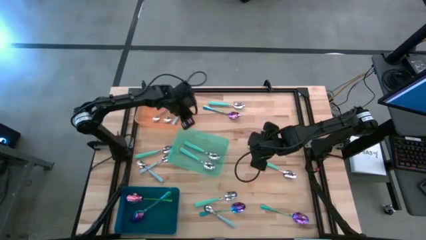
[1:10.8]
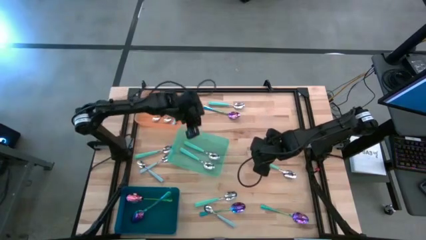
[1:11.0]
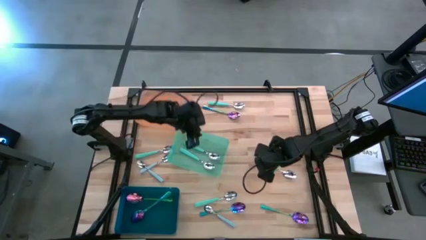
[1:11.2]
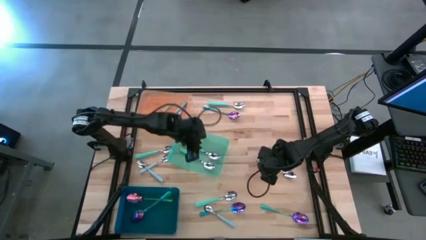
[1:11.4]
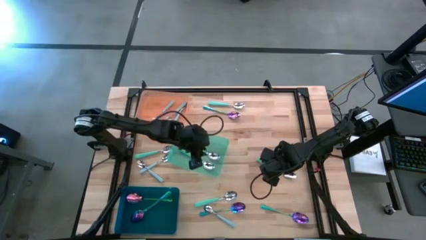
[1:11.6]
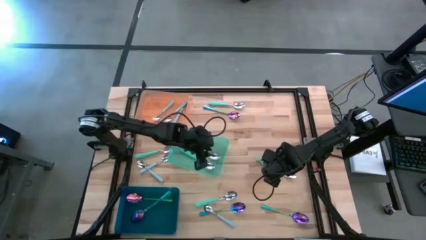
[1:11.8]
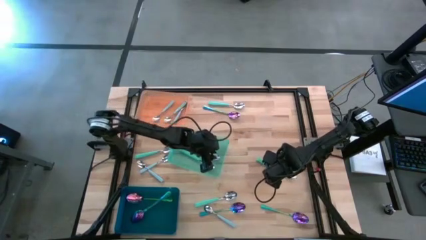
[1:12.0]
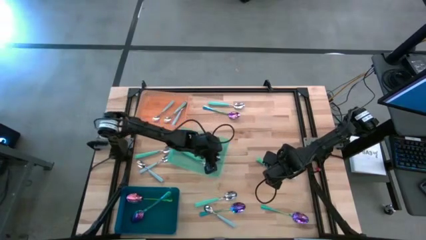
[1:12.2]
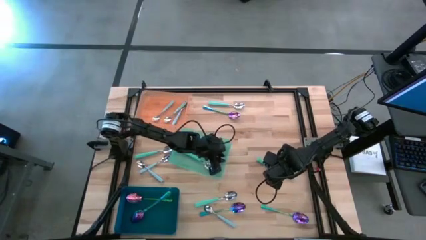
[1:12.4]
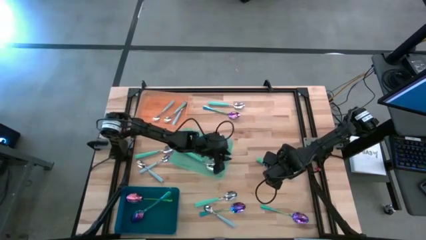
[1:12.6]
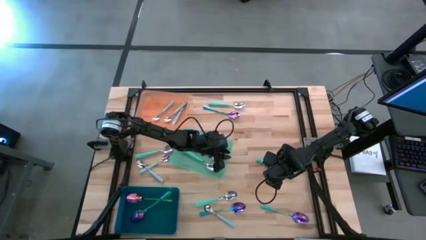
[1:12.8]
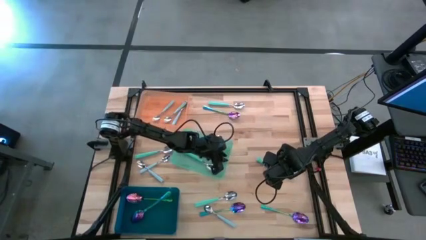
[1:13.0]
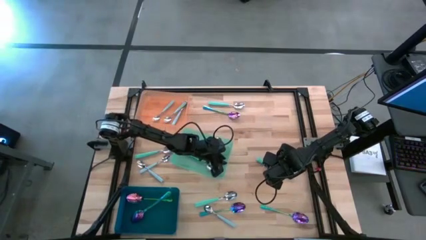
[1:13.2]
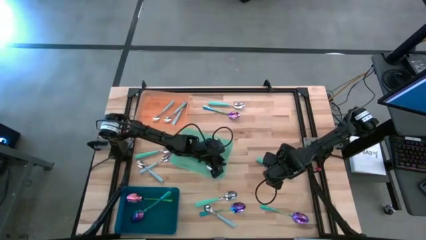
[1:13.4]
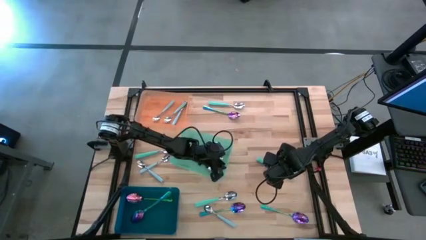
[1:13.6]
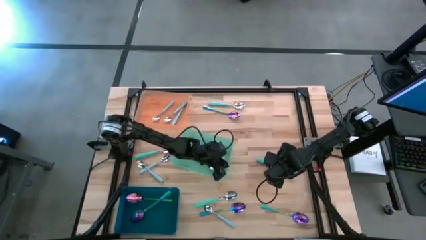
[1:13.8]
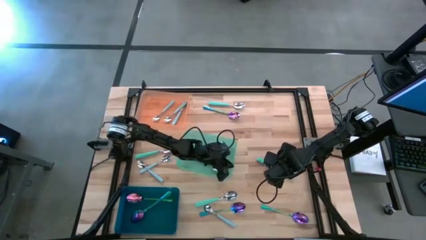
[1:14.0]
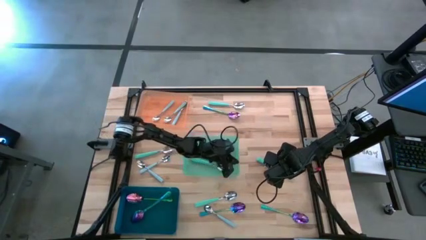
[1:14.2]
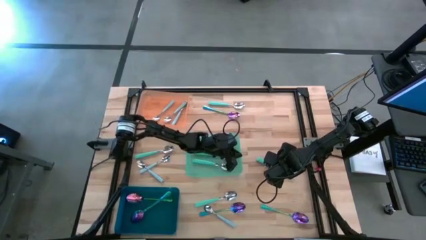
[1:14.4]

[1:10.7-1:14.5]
Task: Sort silverware by color (type)
Adjust the green bin on the table

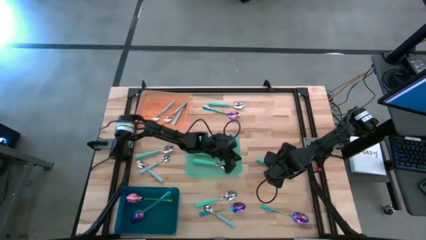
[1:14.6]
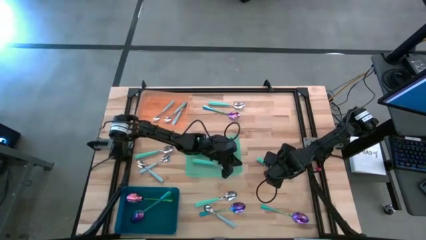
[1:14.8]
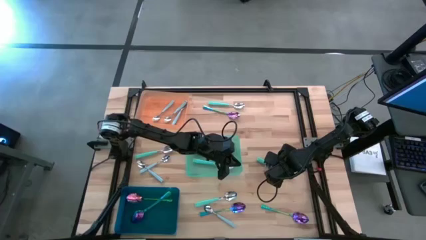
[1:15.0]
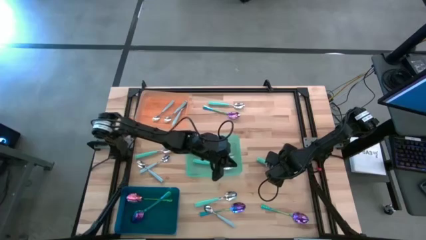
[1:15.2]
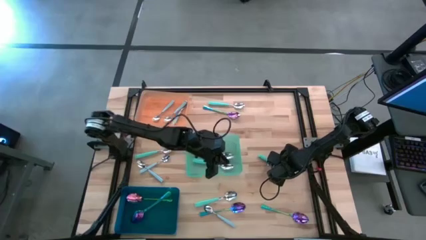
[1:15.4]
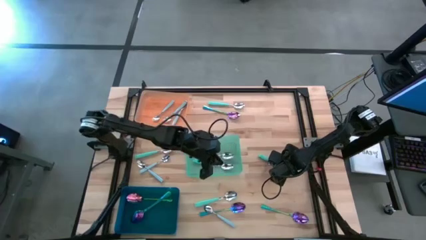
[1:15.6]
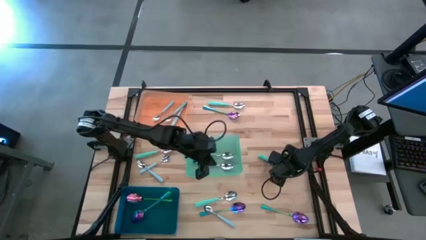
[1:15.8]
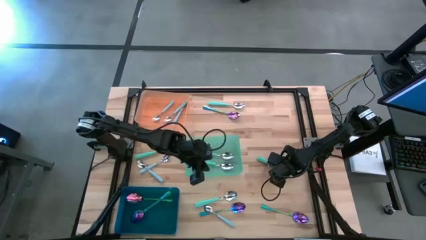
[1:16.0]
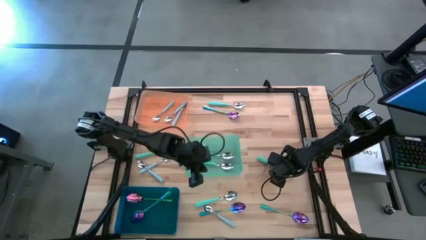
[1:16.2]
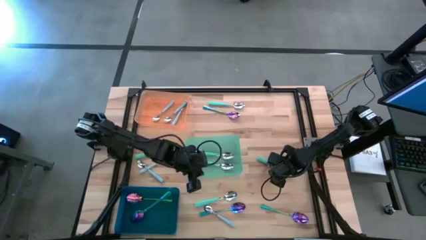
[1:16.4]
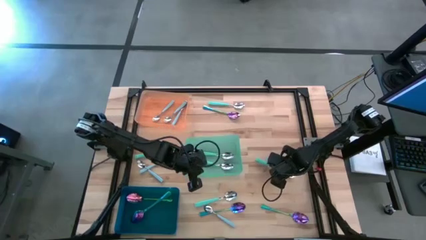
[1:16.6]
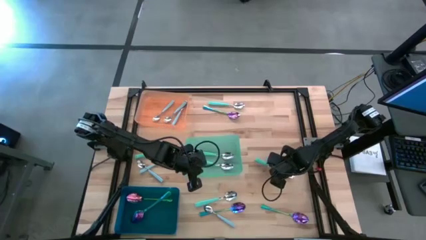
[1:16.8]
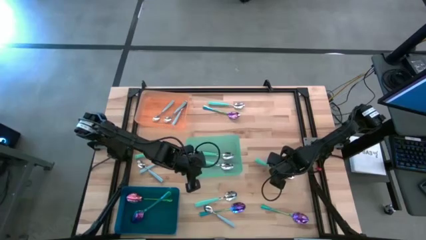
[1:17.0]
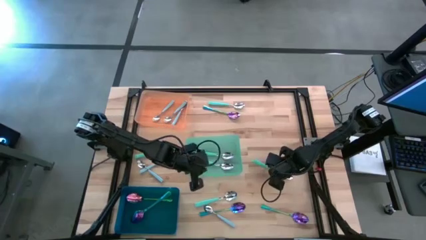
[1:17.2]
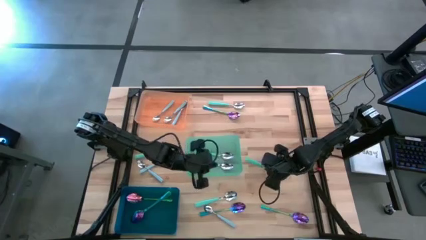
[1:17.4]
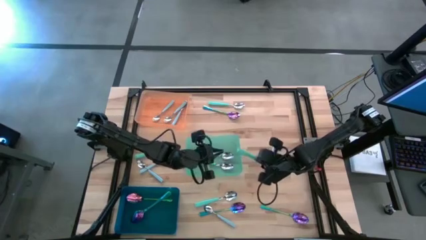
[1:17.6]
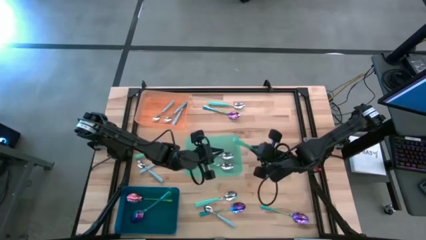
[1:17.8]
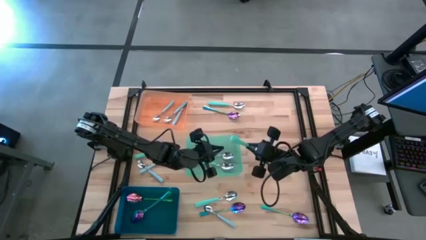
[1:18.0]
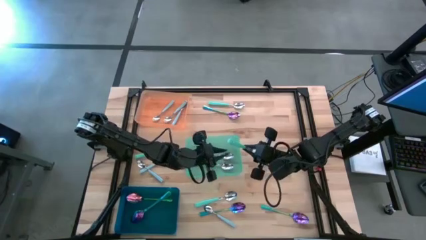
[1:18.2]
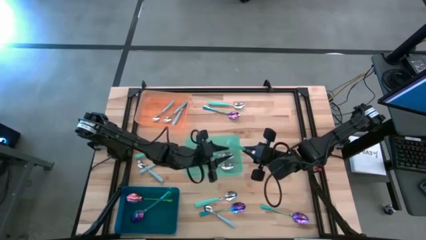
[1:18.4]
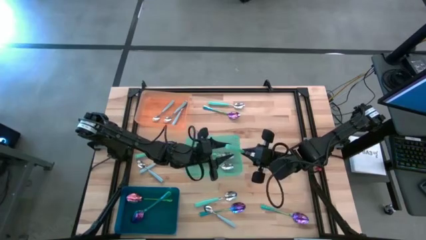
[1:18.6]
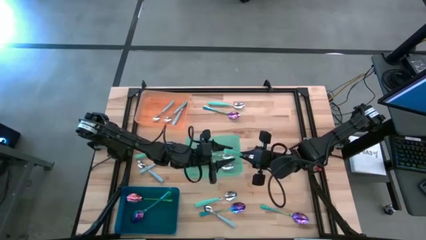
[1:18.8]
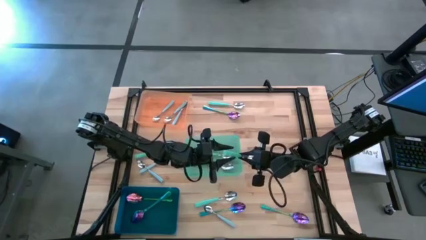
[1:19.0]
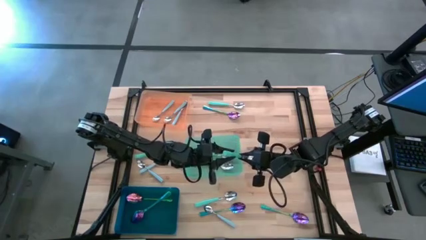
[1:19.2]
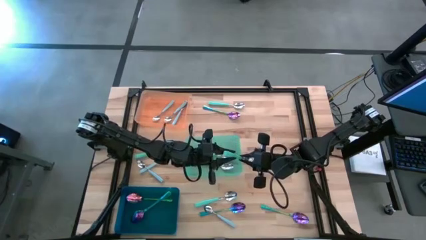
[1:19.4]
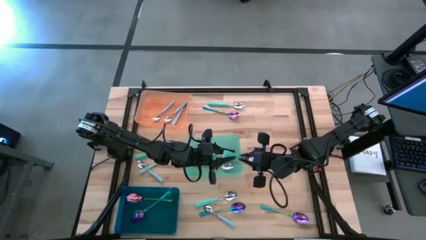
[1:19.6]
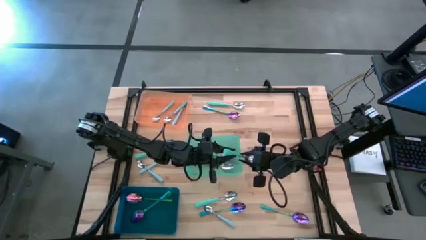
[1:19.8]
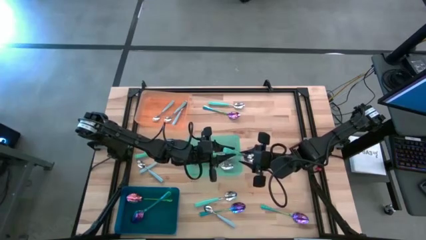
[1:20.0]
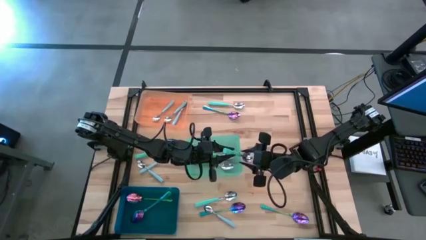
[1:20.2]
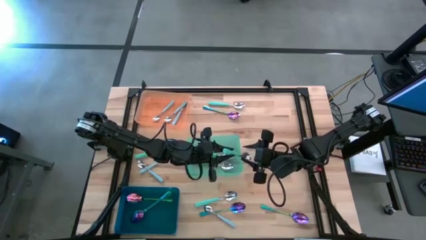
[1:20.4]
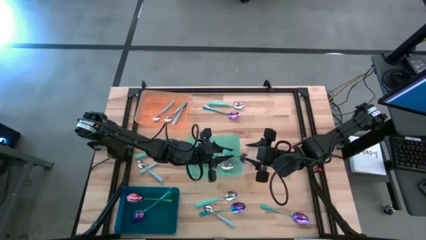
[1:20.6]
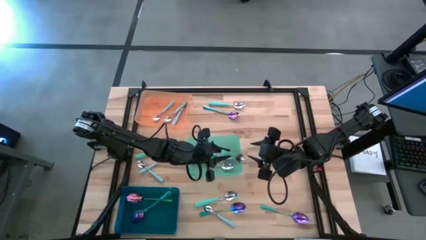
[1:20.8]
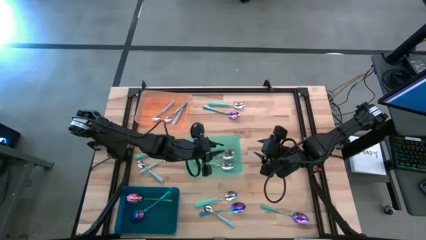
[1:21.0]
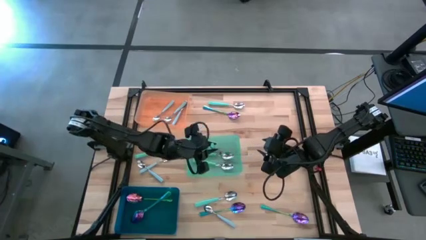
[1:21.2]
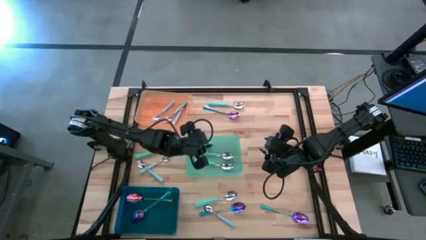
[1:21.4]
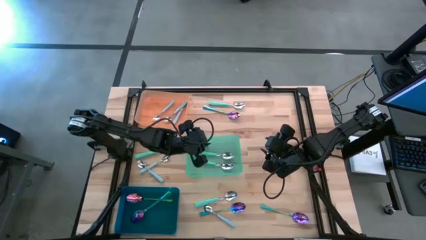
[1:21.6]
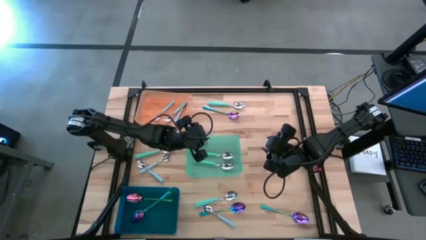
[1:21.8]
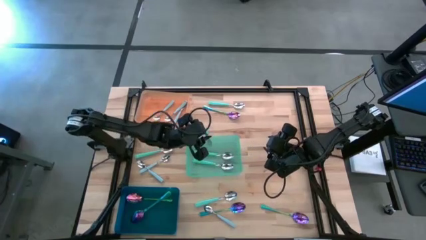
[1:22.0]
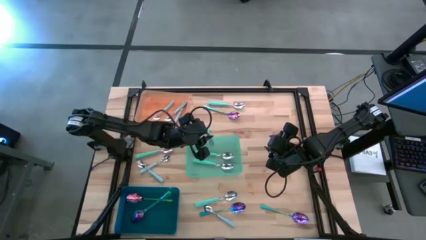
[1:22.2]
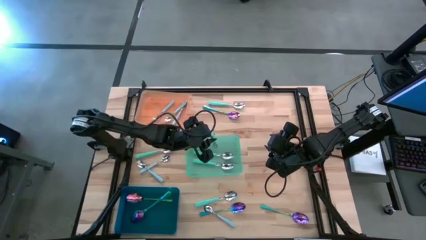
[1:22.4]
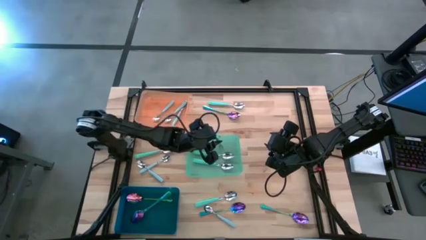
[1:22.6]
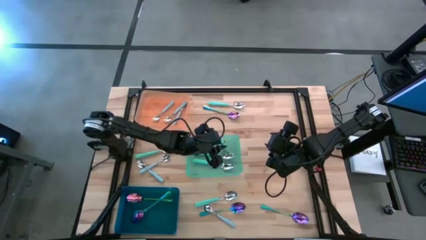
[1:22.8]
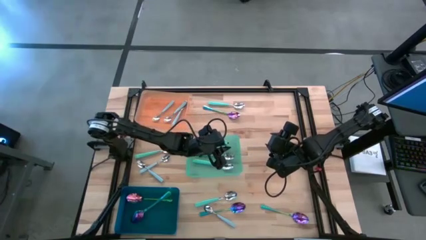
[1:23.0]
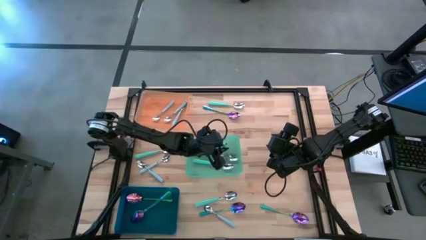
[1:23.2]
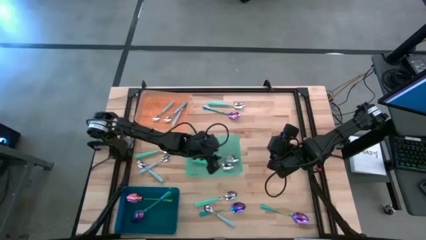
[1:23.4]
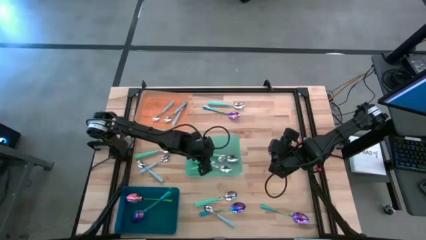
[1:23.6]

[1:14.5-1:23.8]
Put the green spoon into the green bin
